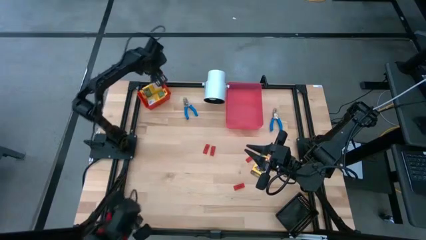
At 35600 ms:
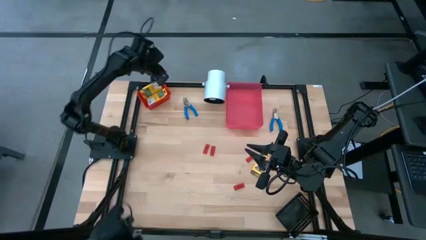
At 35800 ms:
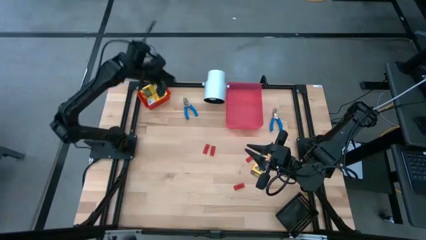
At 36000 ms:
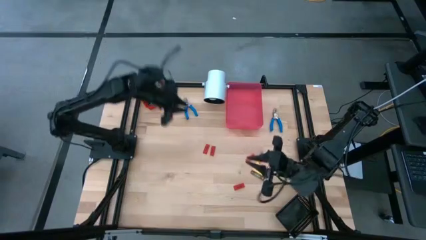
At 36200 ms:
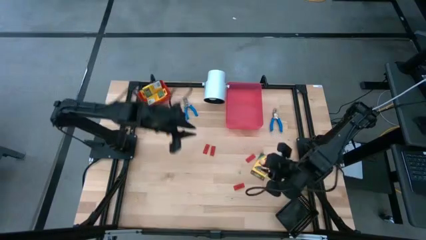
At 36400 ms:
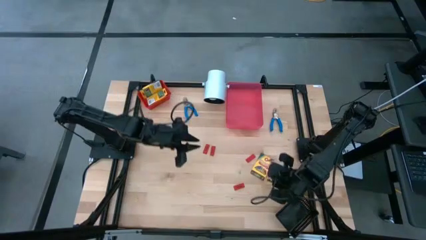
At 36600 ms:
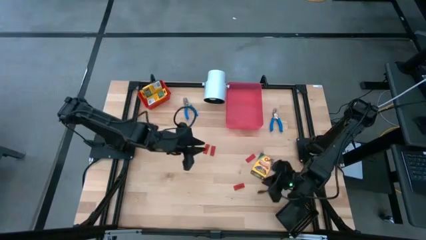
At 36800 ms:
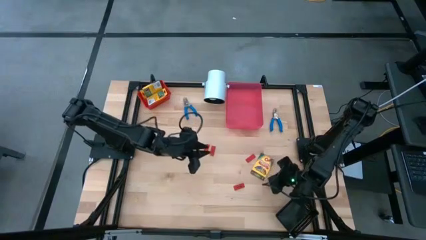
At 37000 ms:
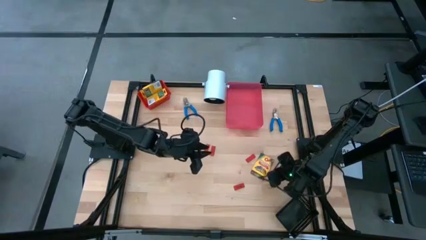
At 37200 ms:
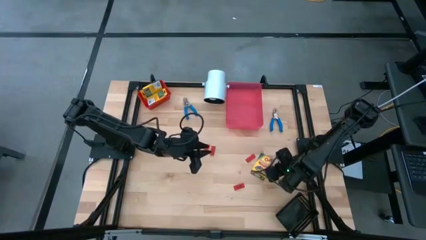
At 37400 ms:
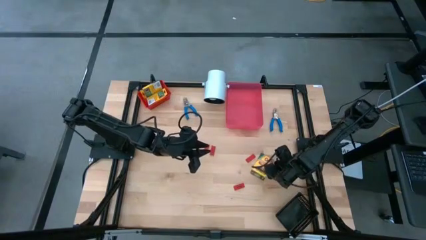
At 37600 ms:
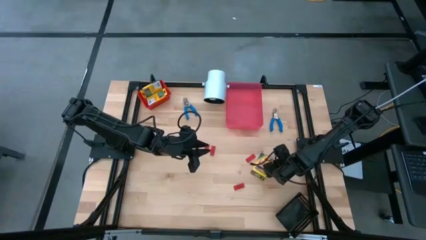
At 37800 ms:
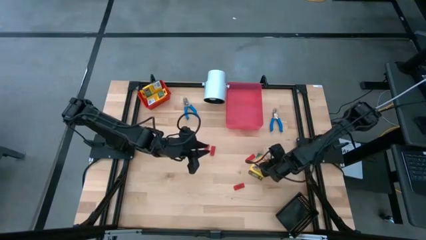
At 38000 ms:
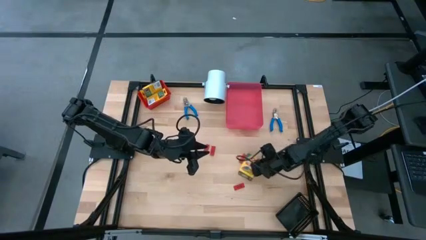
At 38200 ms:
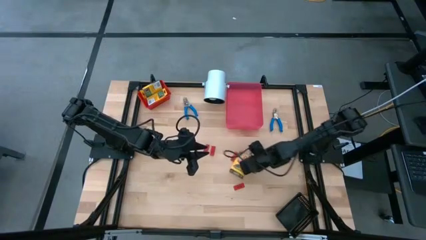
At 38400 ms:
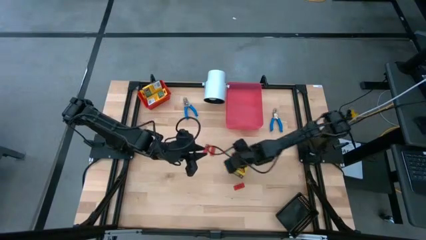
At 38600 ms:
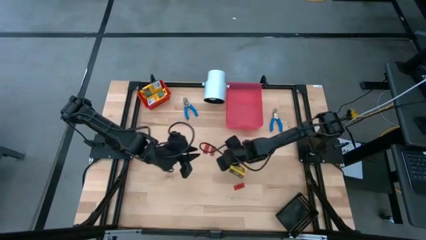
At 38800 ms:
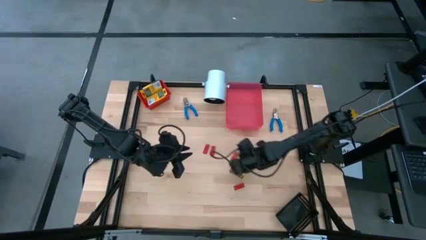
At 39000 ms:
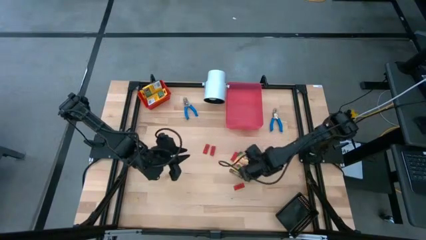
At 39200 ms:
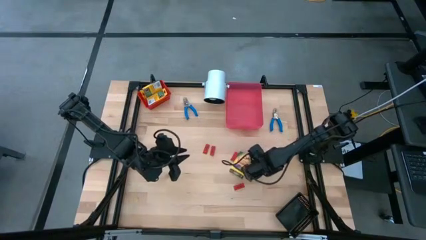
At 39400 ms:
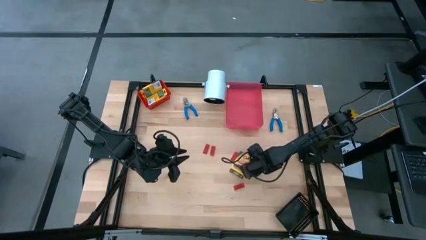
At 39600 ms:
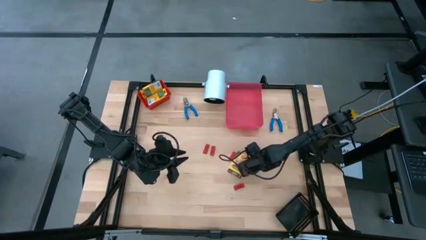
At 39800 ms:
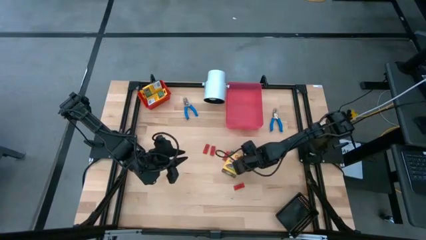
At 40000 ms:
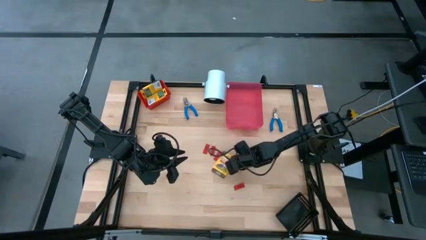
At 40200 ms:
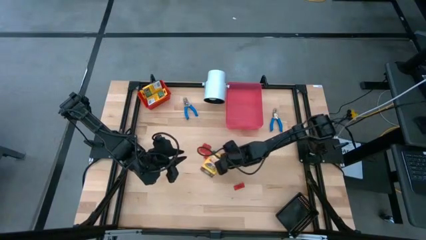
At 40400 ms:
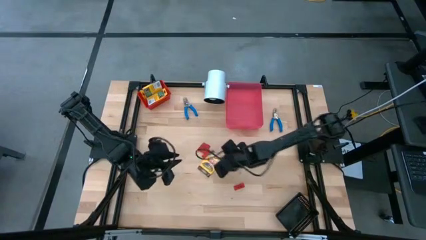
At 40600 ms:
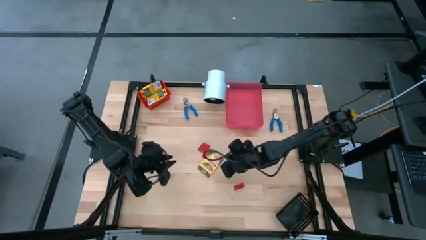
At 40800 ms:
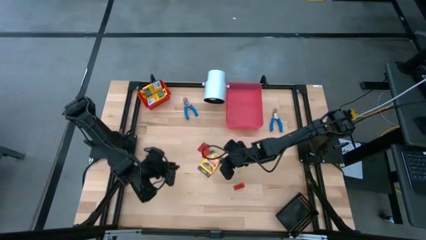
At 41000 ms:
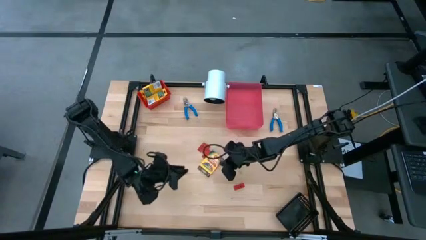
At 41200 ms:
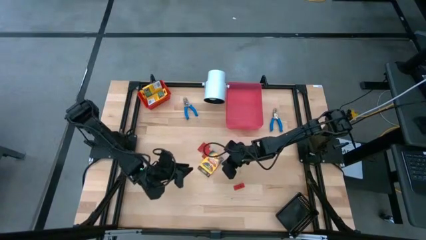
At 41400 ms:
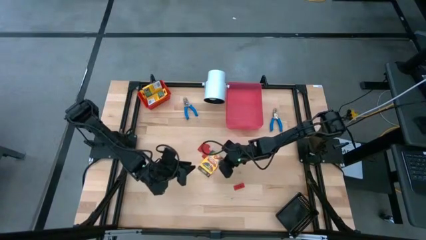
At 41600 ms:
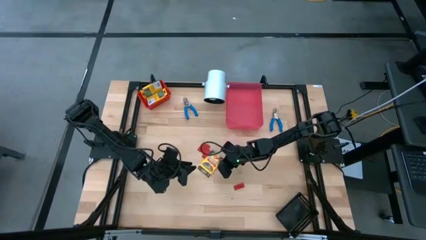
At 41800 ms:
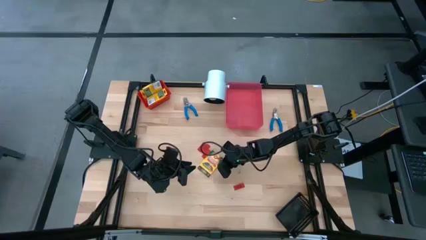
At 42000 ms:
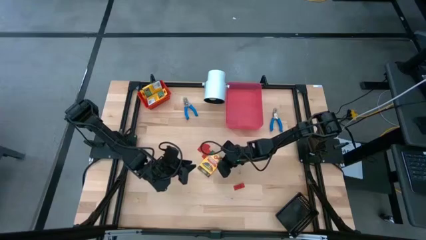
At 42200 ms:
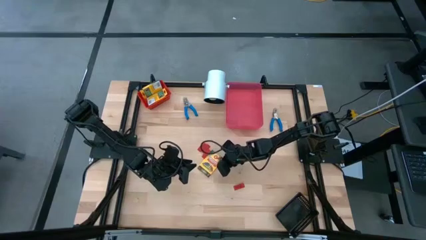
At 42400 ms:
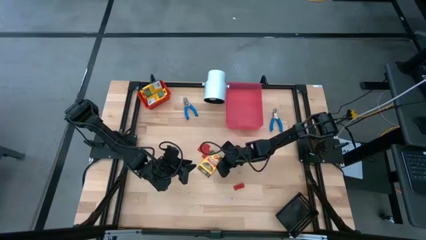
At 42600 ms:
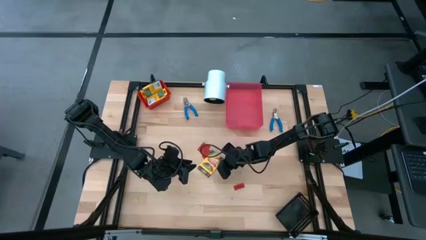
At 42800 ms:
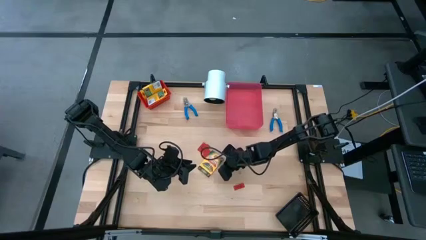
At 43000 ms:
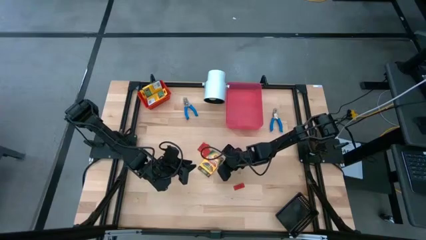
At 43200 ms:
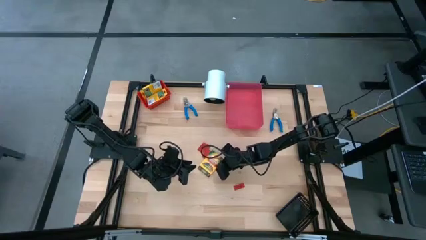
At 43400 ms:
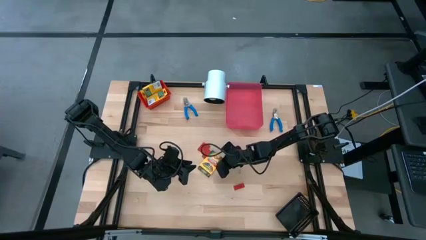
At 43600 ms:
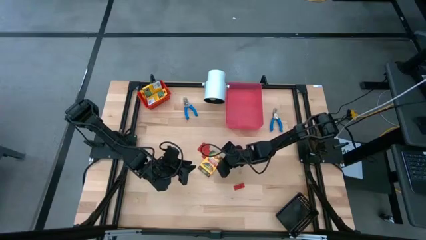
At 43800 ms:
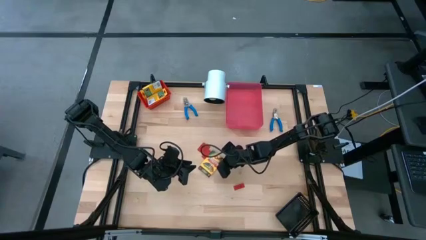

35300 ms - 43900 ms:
Task: Pick & Place School Supplies
Put the yellow crayon box into the red bin

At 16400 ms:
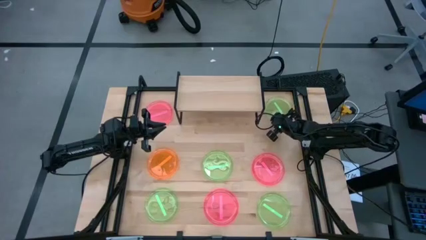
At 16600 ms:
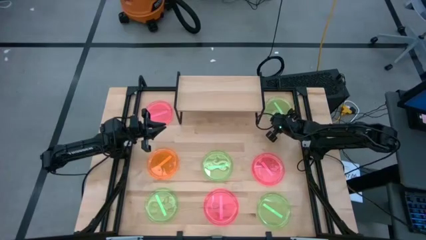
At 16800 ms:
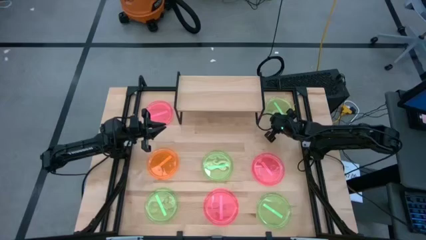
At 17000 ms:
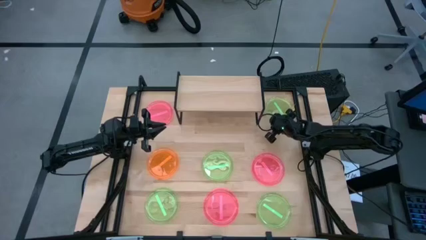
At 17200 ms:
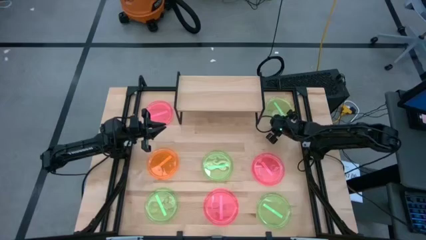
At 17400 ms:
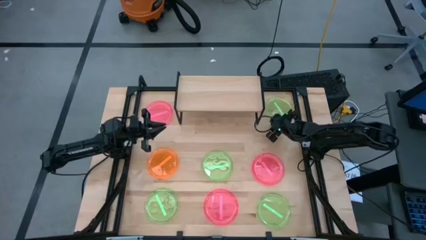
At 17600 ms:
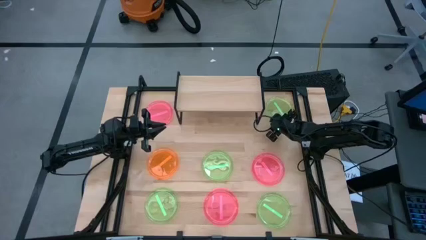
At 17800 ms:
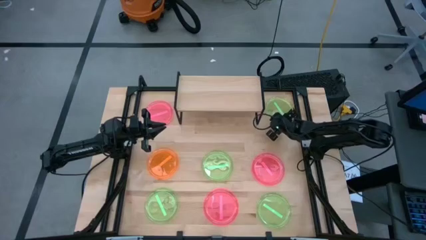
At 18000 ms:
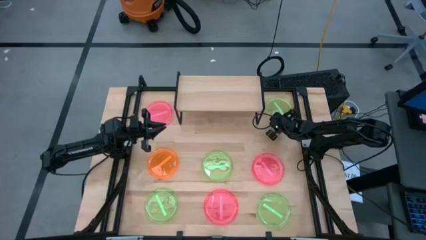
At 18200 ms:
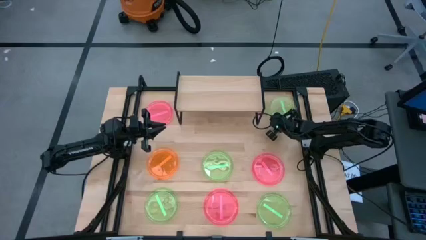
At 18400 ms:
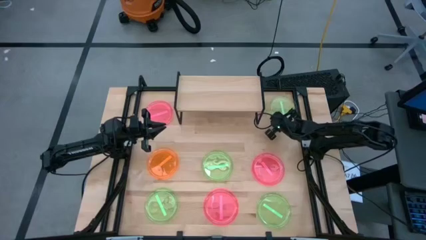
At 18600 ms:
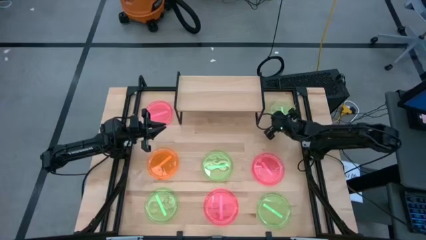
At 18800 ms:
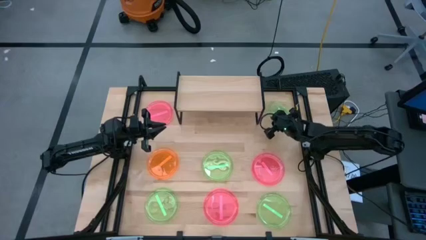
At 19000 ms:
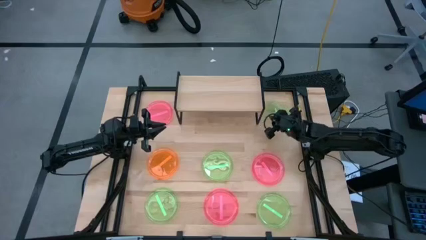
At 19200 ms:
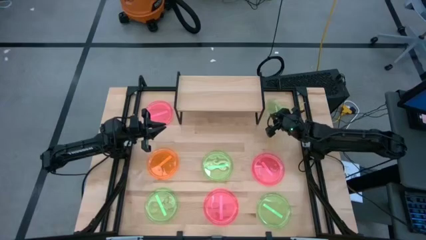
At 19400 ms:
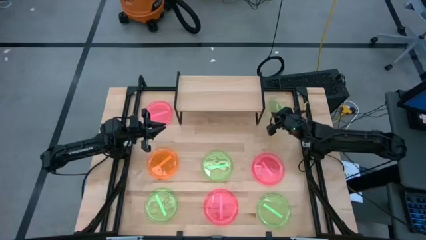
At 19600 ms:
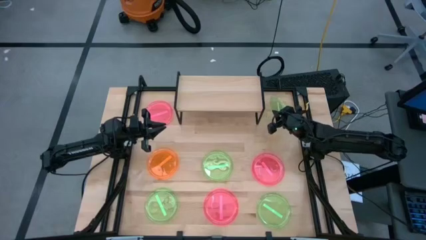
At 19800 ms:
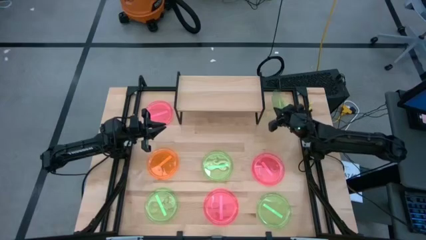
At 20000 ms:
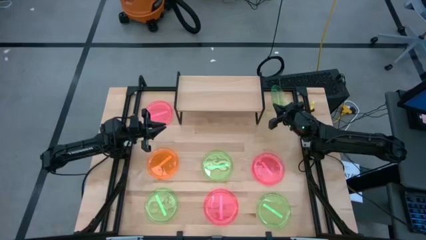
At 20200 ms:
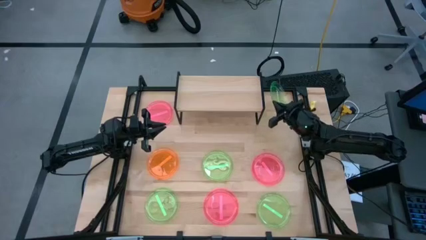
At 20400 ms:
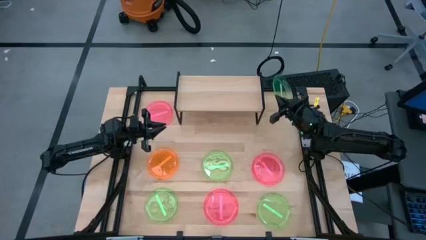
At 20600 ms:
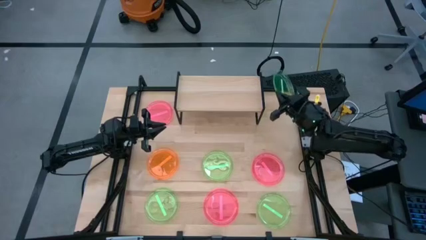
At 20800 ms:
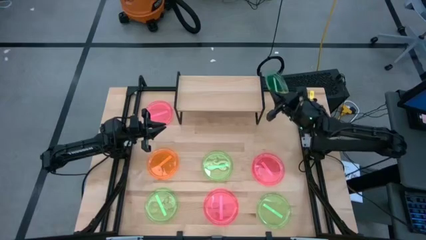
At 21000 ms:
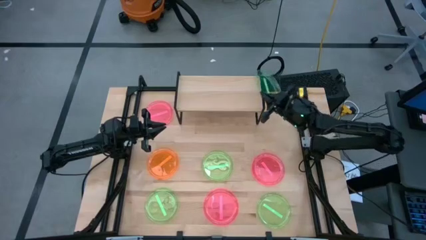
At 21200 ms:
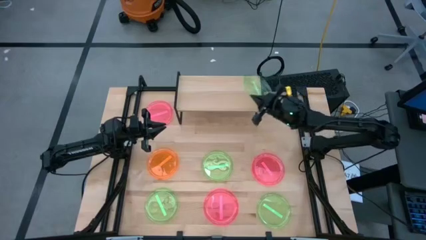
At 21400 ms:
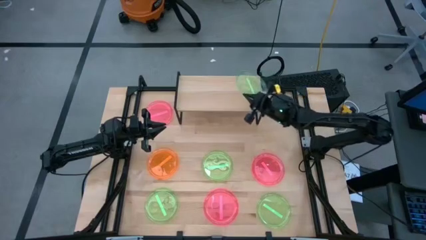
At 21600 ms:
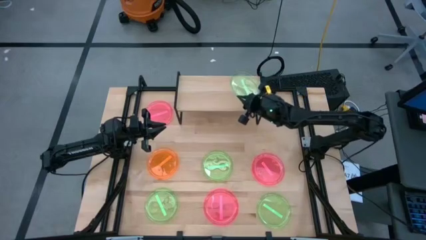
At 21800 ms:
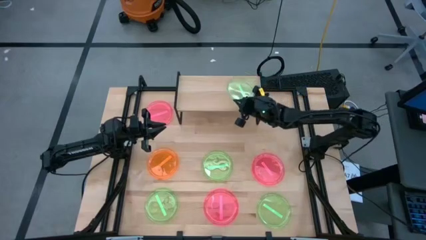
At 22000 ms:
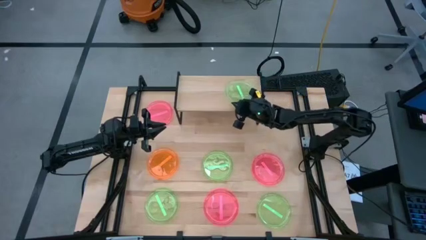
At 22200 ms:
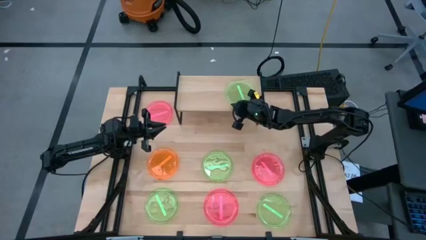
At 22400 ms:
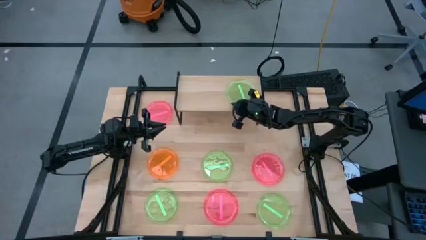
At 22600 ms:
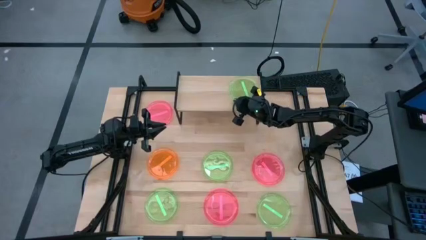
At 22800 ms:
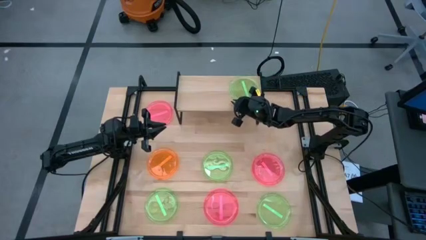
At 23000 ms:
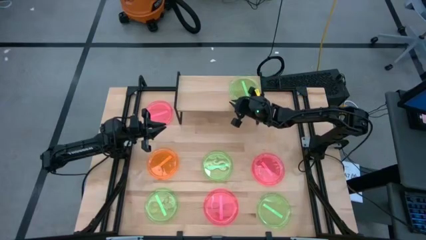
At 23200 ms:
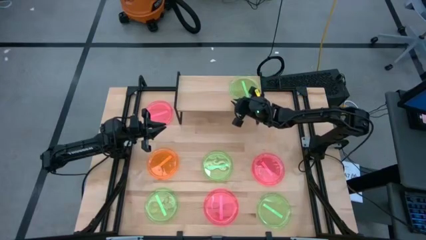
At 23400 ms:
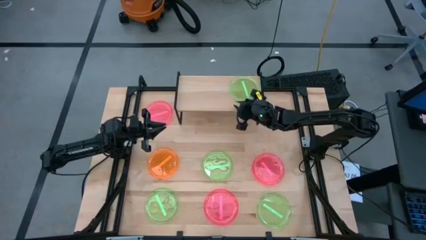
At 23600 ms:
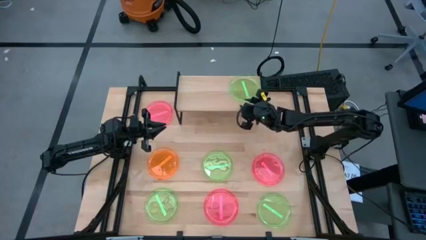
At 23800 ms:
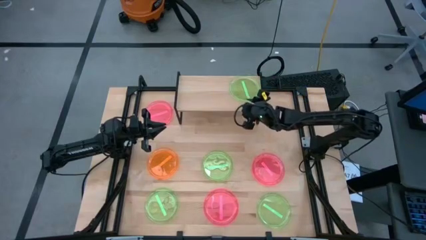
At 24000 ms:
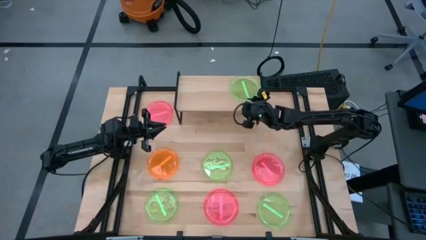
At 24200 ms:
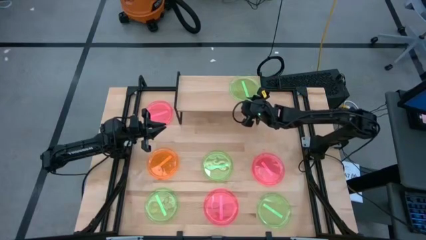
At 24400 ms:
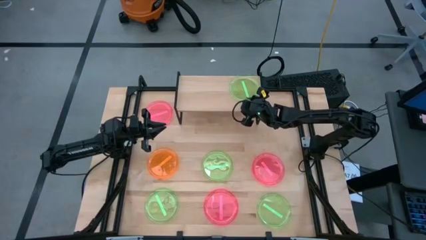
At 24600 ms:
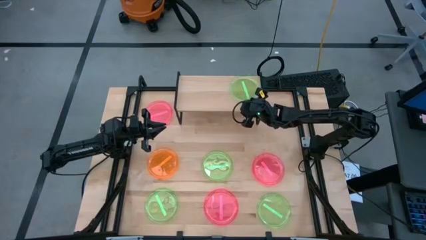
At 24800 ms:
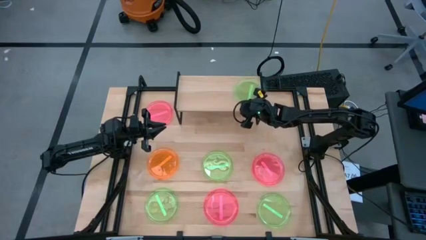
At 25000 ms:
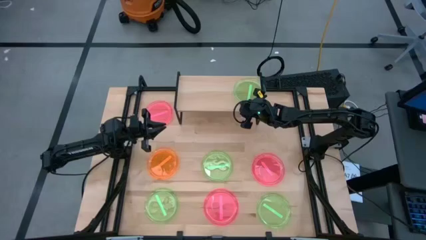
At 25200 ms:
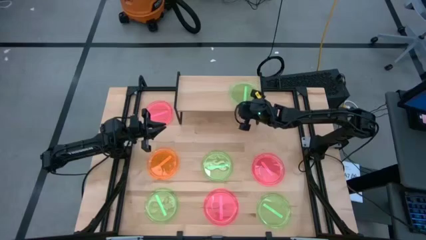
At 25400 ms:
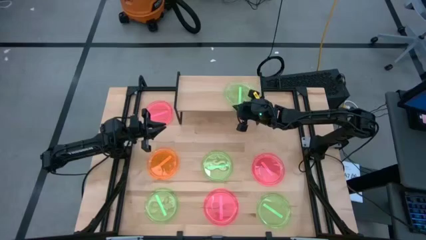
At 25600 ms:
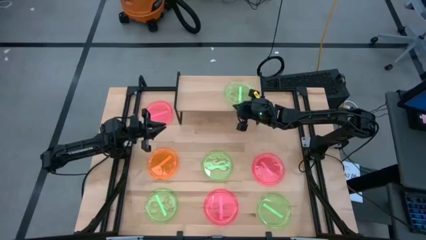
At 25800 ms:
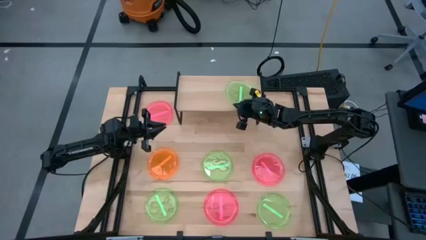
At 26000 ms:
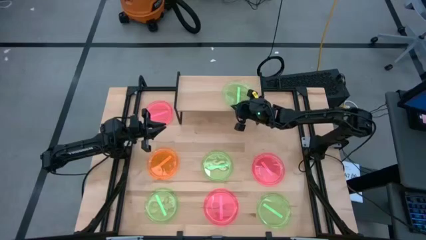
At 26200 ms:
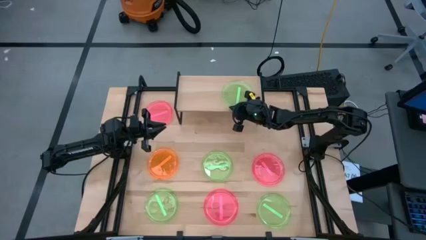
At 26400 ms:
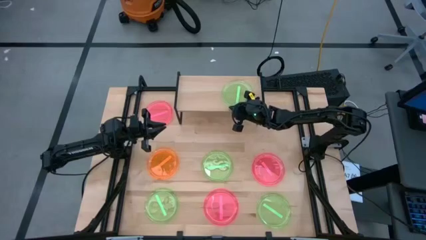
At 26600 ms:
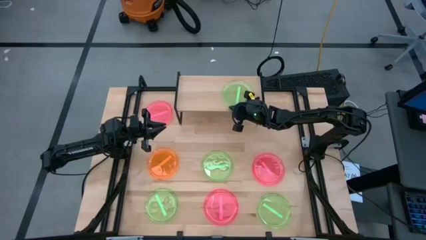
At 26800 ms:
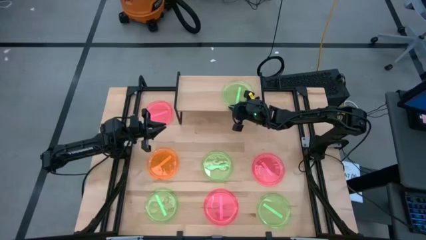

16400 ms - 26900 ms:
Task: Place and stack plates onto a shelf
Put the green plate on the shelf
